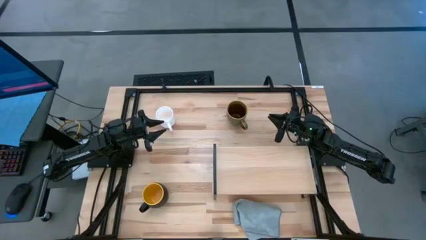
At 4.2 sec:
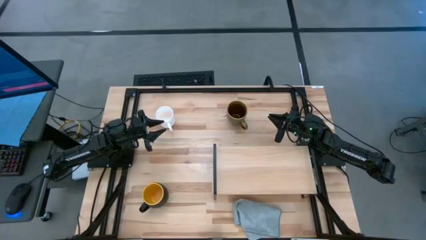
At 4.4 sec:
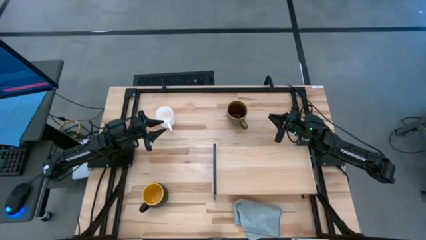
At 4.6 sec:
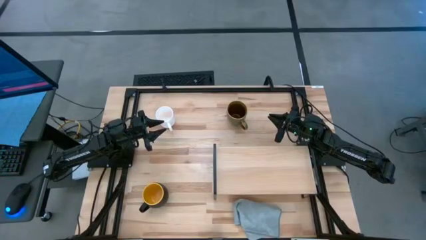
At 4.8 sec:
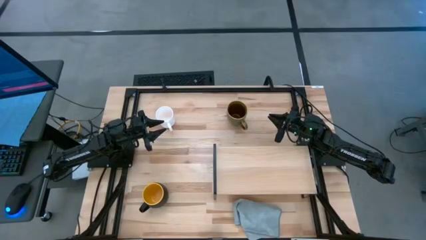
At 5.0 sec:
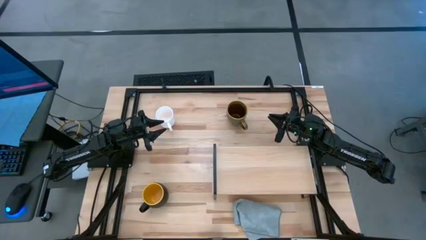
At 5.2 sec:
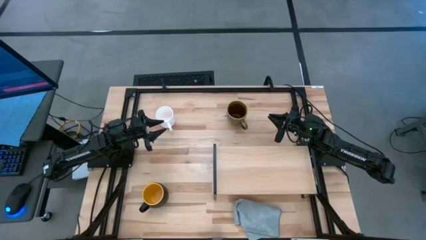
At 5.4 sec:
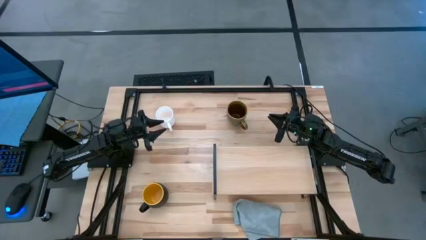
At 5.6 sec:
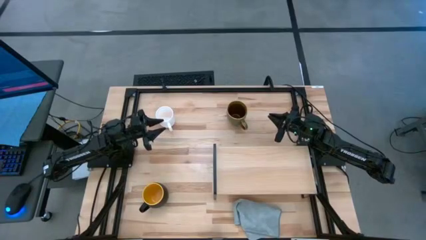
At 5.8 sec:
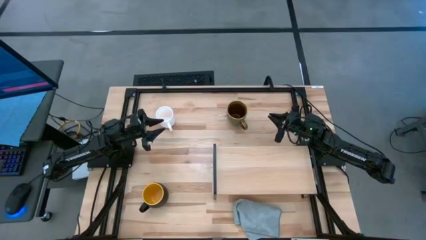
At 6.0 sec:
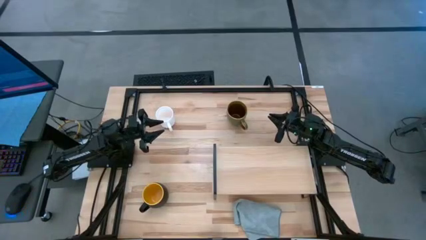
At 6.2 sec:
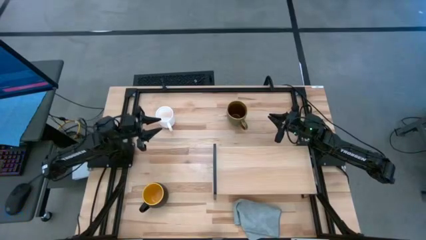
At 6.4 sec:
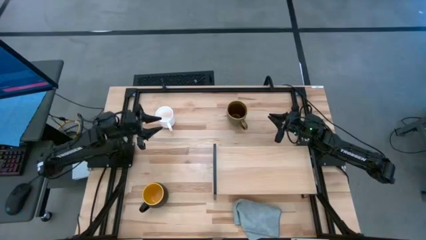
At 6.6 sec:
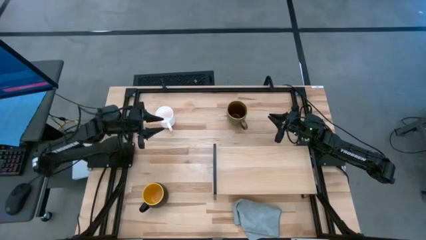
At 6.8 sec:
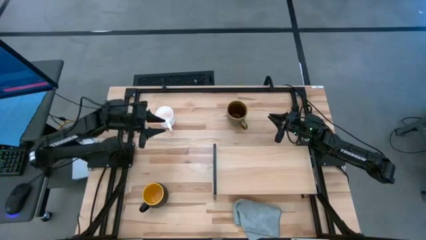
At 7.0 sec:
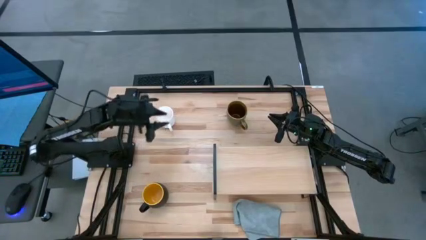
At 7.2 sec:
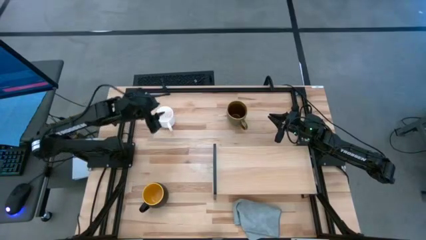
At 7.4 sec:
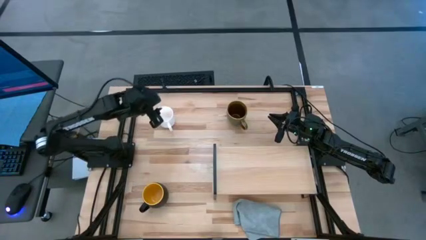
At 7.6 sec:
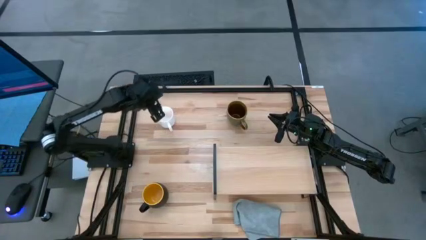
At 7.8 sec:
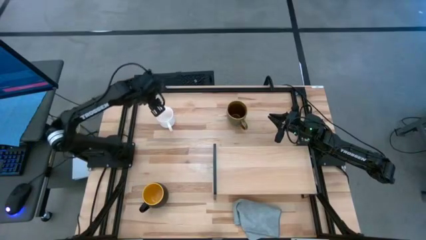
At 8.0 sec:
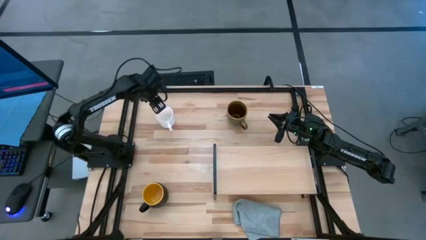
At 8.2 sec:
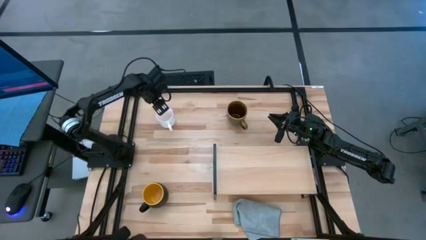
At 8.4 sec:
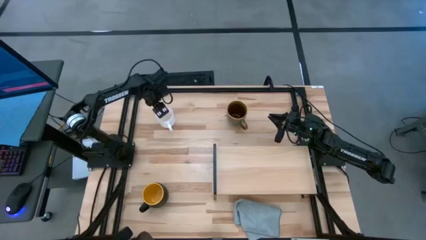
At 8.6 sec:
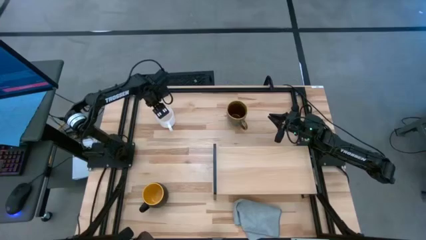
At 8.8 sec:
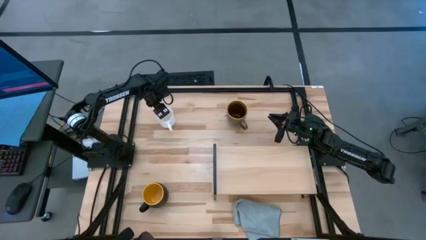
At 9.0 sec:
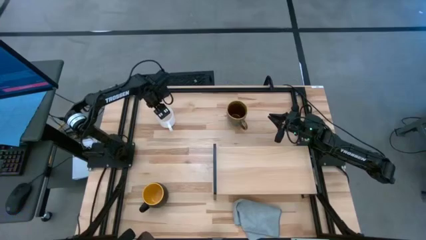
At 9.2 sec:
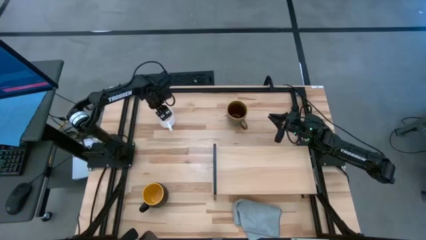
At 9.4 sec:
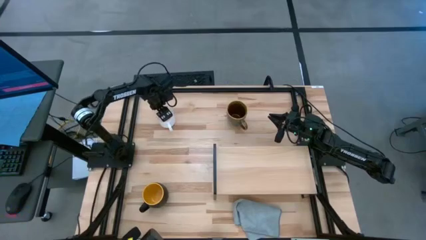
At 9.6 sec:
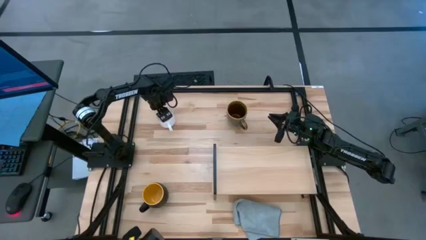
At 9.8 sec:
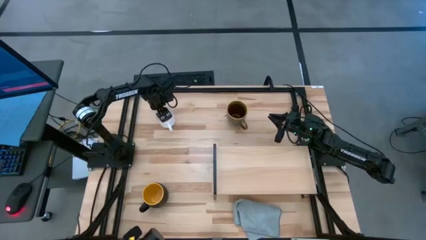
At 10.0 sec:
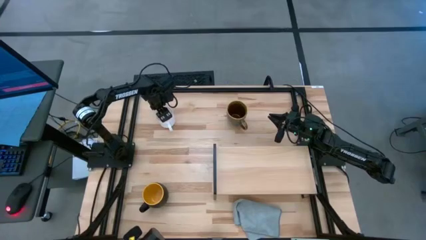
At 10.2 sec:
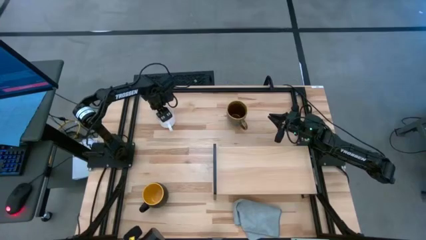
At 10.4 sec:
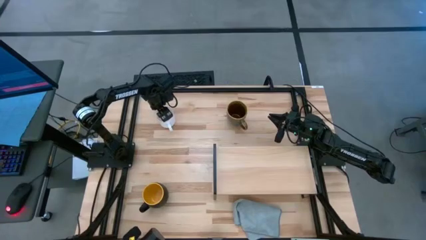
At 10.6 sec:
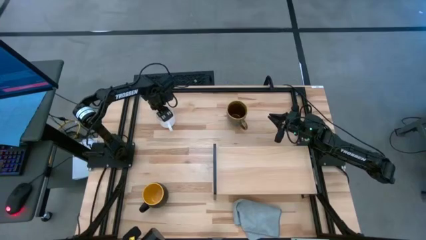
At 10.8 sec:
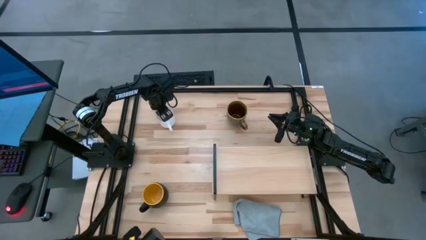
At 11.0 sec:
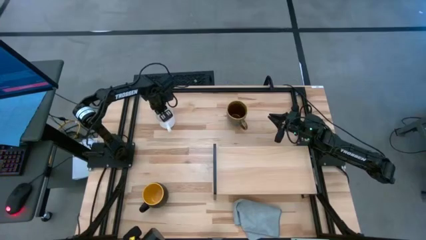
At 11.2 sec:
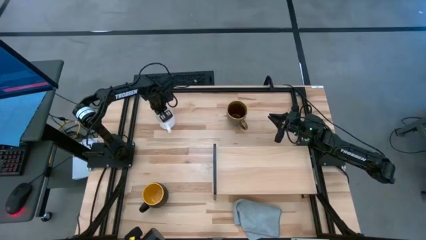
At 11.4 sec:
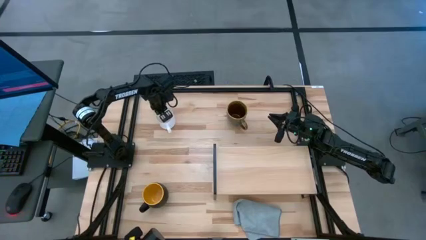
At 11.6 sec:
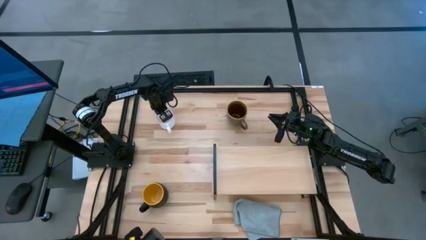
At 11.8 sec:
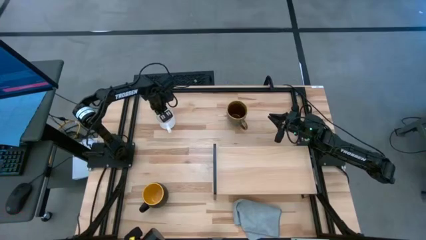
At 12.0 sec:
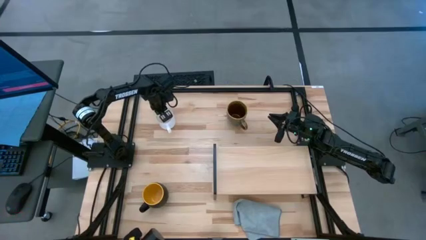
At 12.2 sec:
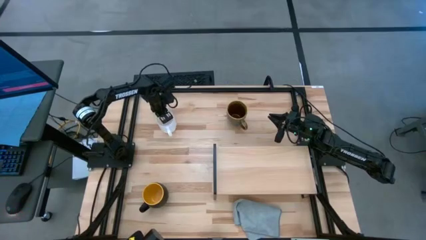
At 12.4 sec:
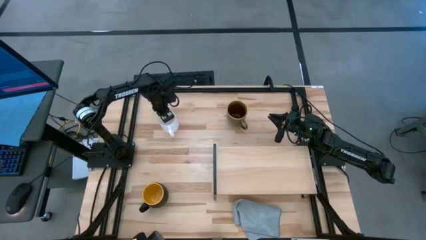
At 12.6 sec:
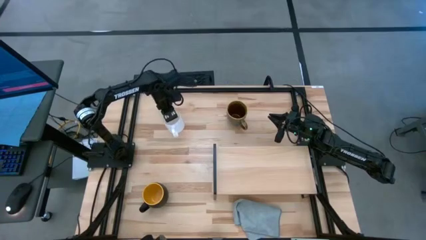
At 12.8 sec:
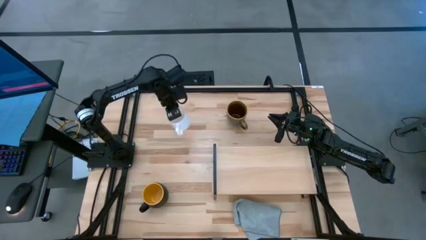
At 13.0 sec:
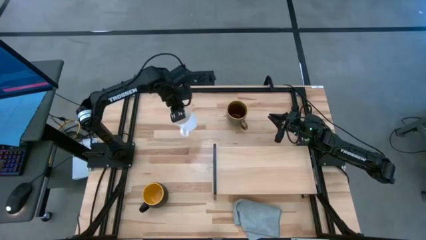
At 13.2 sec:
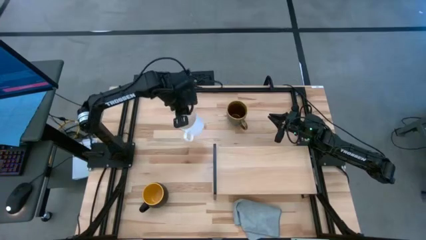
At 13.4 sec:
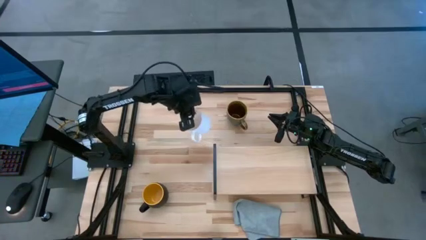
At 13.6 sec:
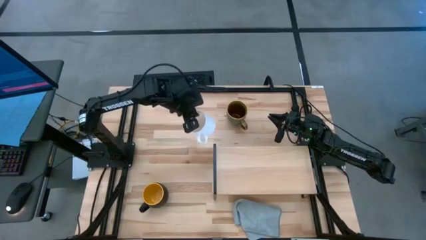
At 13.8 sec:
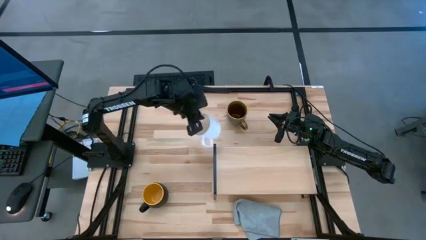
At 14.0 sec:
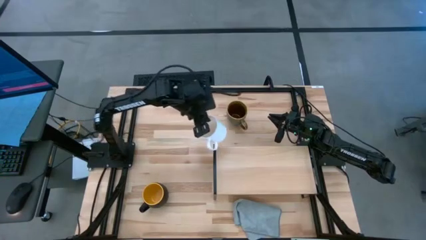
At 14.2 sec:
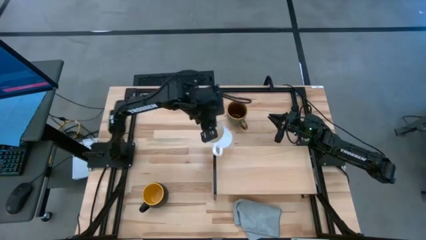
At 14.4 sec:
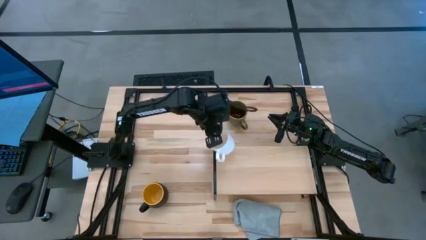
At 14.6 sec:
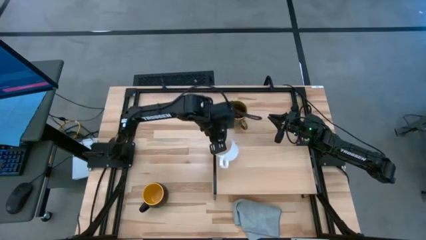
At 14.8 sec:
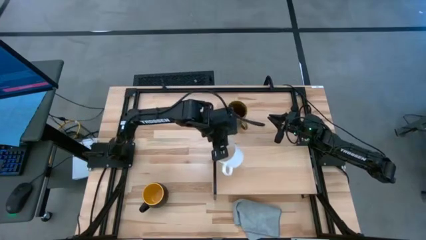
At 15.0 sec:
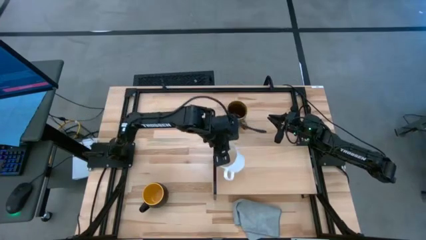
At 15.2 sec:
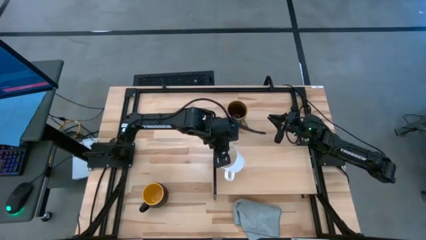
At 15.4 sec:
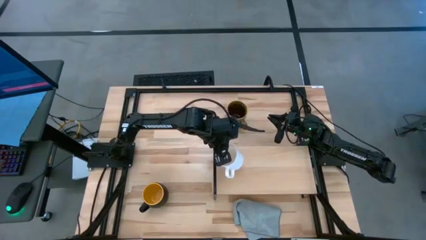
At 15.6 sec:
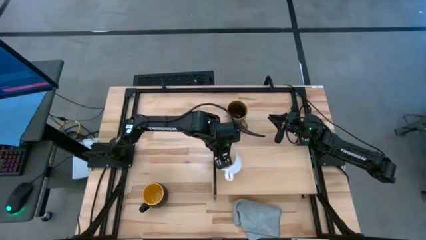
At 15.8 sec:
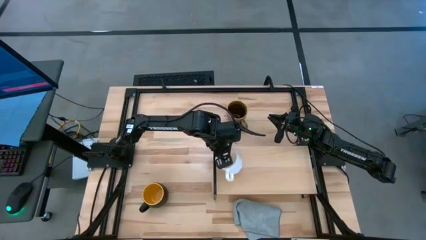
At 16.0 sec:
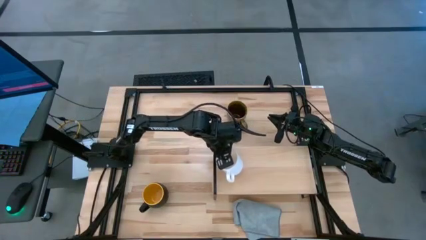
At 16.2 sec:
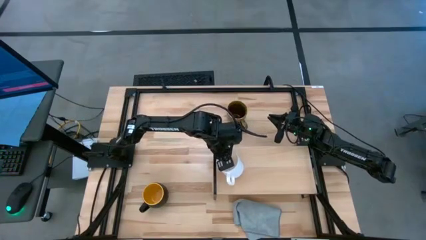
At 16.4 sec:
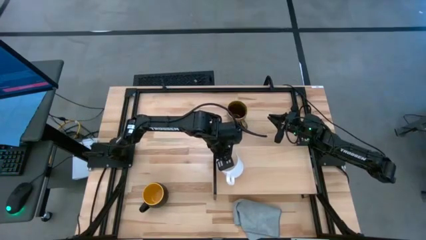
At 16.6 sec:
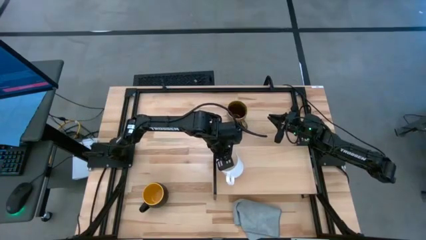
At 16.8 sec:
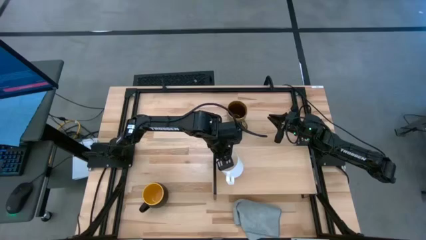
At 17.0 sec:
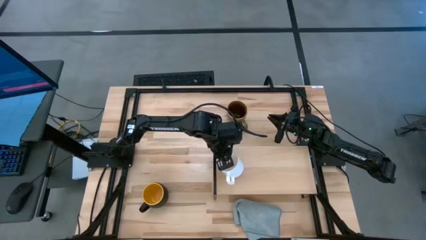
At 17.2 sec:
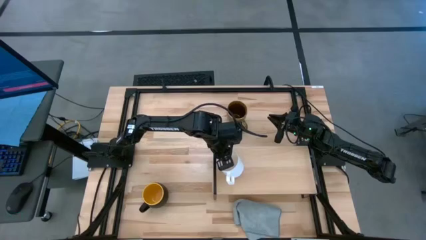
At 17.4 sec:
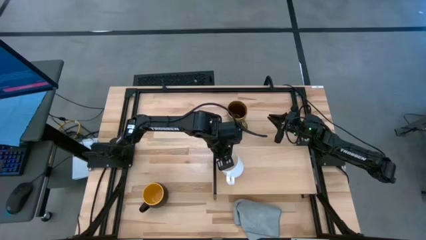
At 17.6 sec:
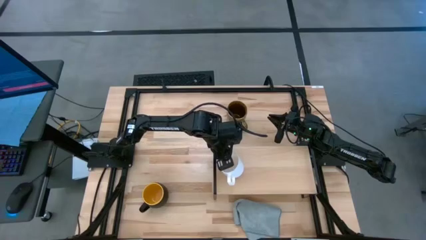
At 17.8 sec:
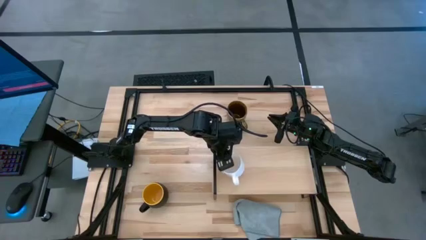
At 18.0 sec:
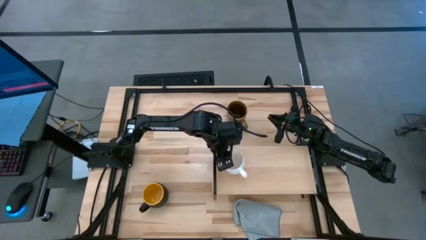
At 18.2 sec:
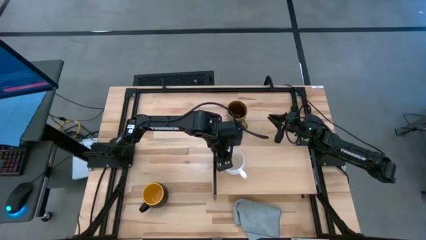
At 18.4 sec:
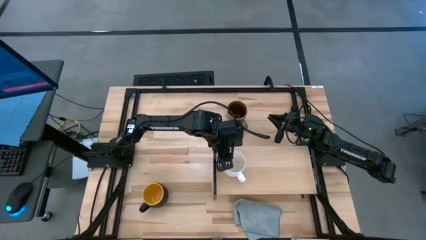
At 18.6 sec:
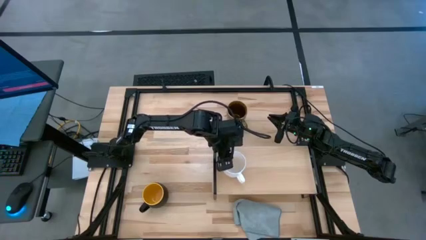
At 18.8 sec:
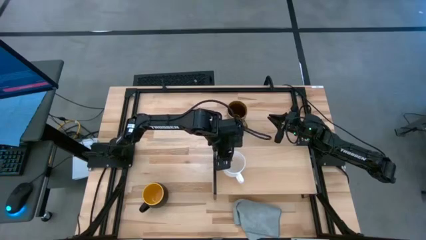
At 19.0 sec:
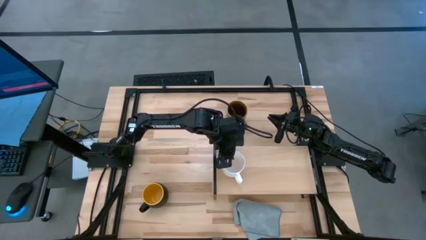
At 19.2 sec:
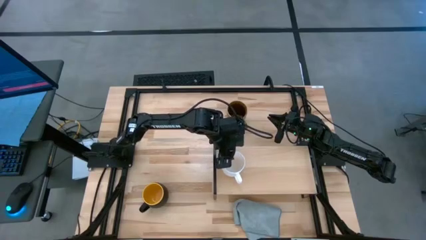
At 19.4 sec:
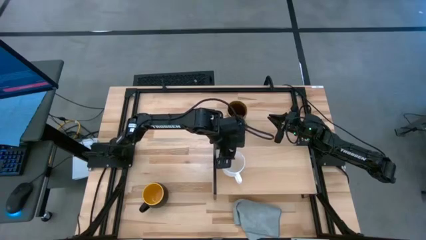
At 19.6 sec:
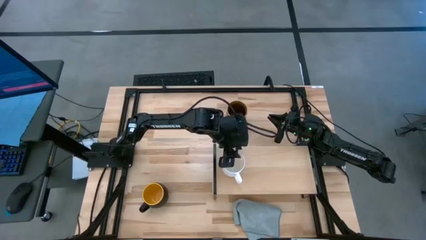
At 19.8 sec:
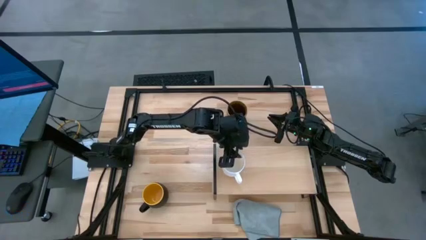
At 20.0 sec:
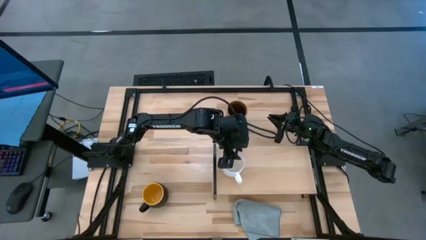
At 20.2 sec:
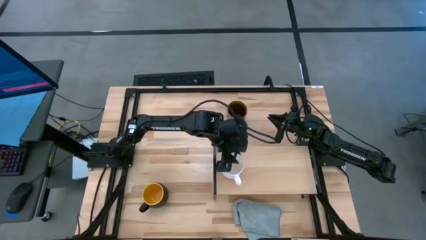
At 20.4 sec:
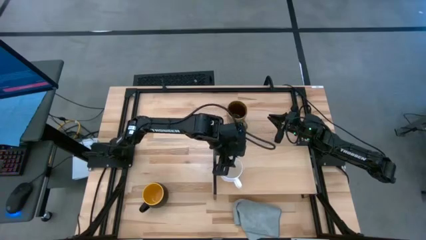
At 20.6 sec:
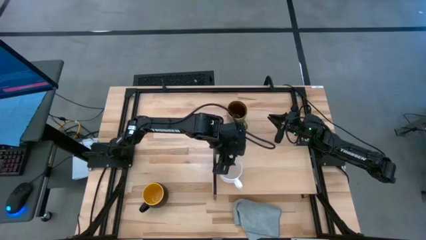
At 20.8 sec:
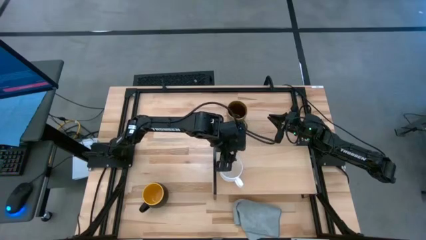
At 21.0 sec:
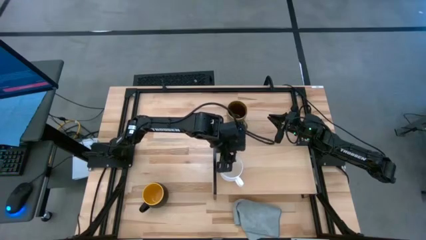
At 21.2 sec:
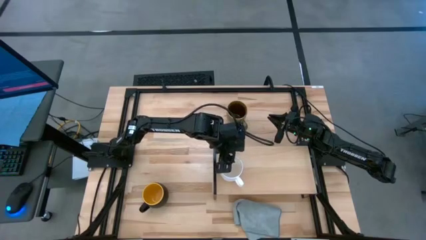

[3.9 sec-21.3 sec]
Task: Stack small to large cups/mugs on shelf
Put the white mug on the shelf
